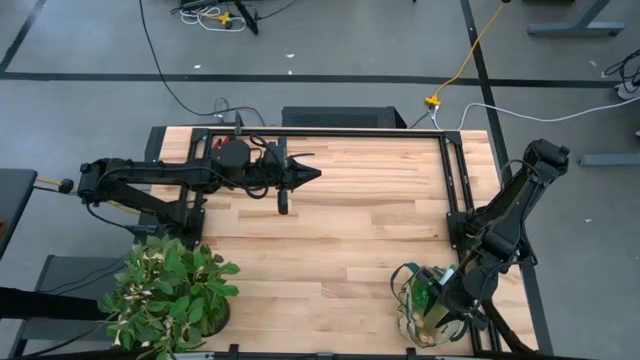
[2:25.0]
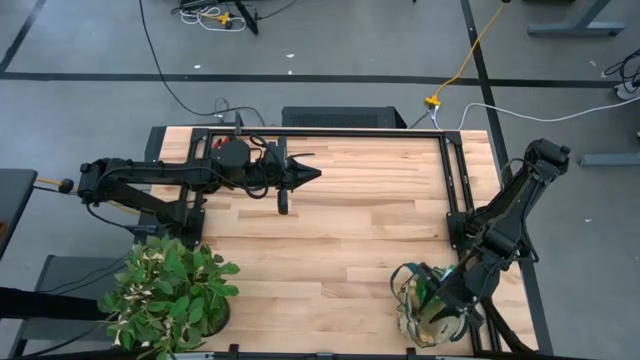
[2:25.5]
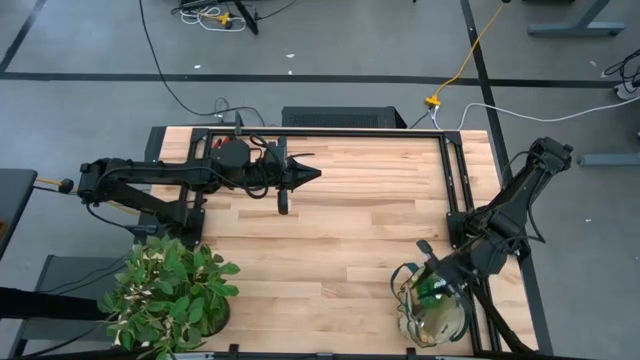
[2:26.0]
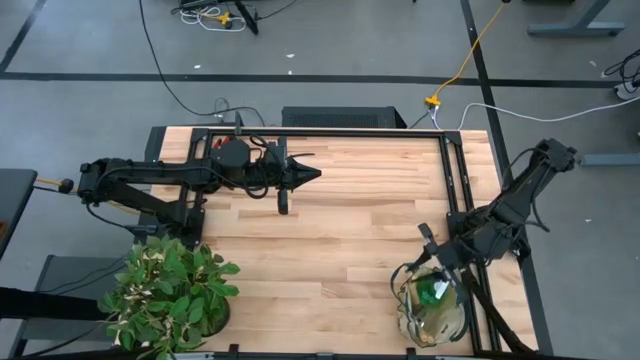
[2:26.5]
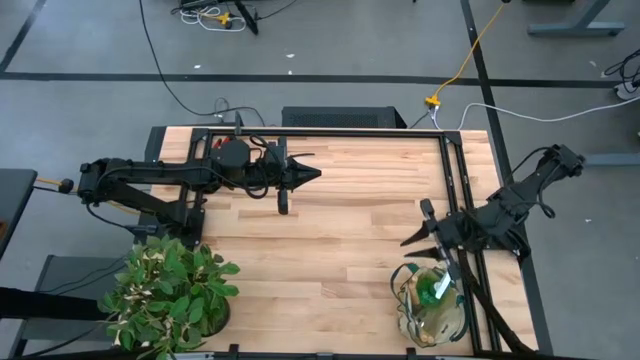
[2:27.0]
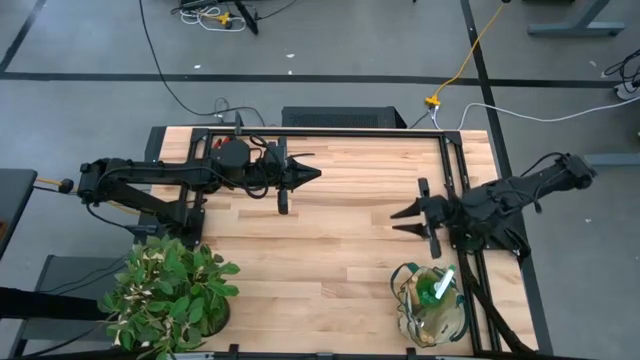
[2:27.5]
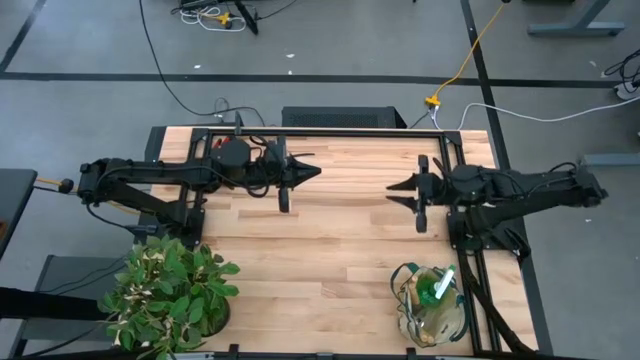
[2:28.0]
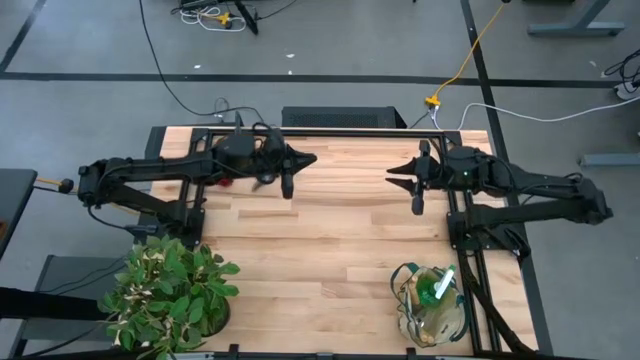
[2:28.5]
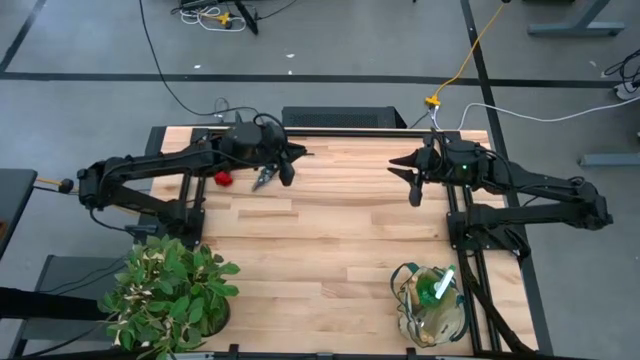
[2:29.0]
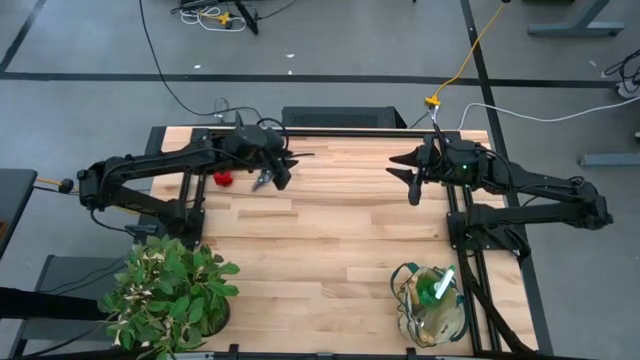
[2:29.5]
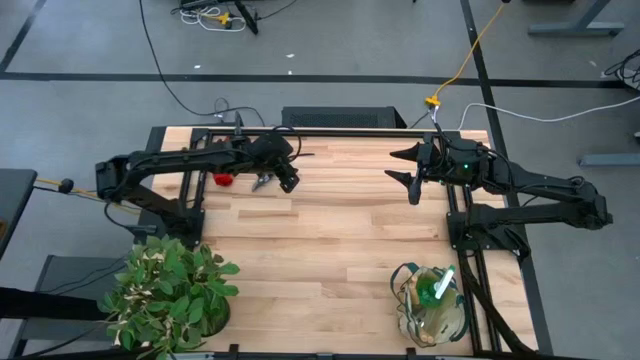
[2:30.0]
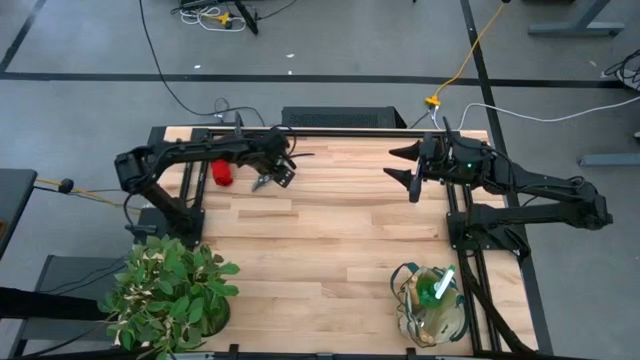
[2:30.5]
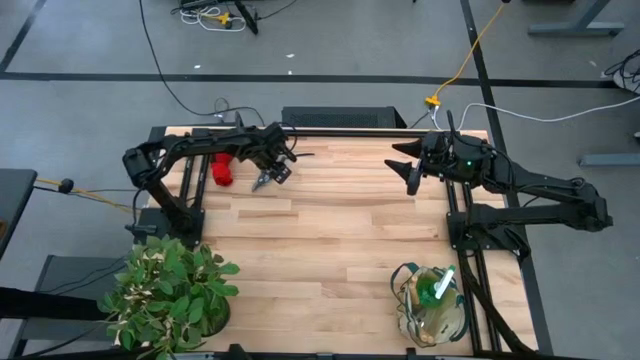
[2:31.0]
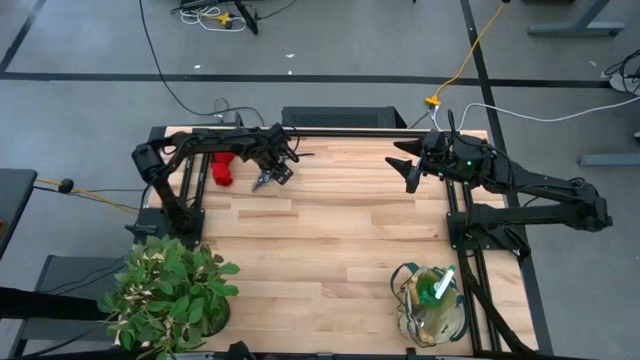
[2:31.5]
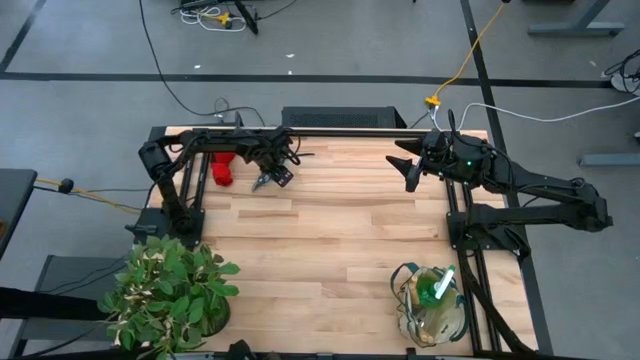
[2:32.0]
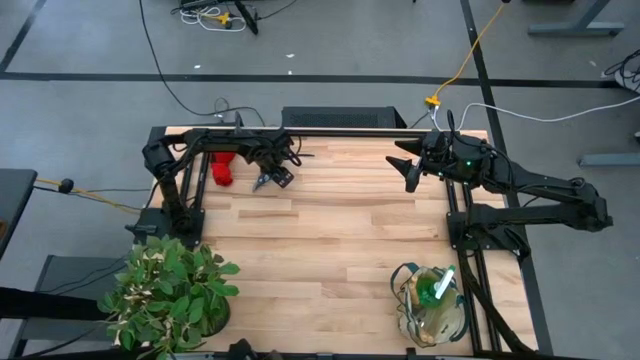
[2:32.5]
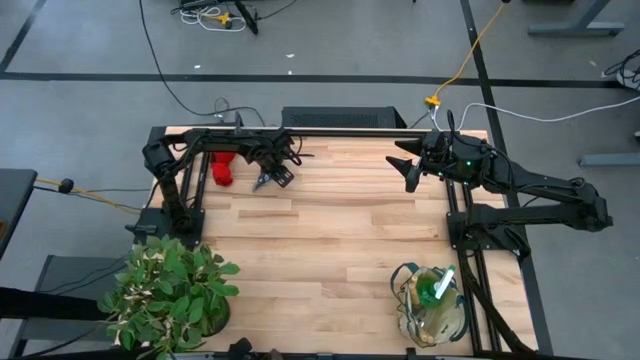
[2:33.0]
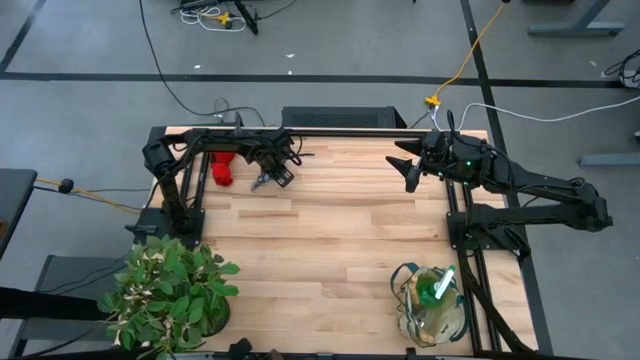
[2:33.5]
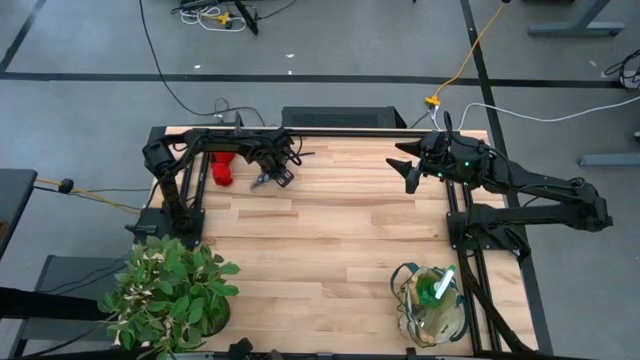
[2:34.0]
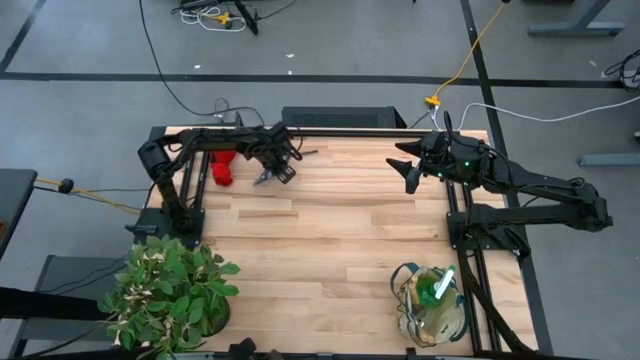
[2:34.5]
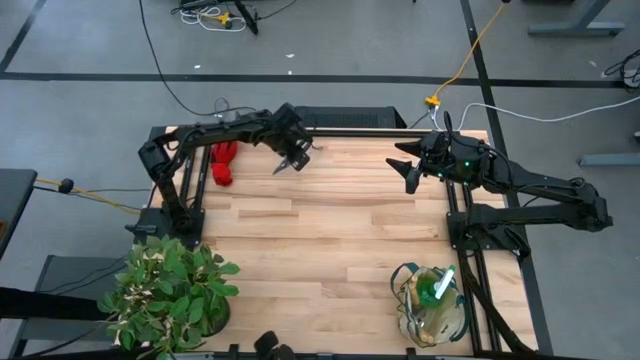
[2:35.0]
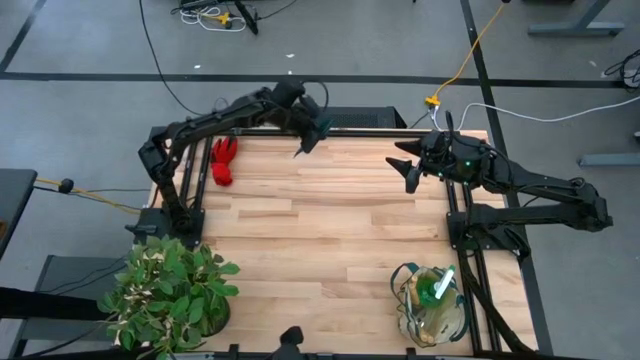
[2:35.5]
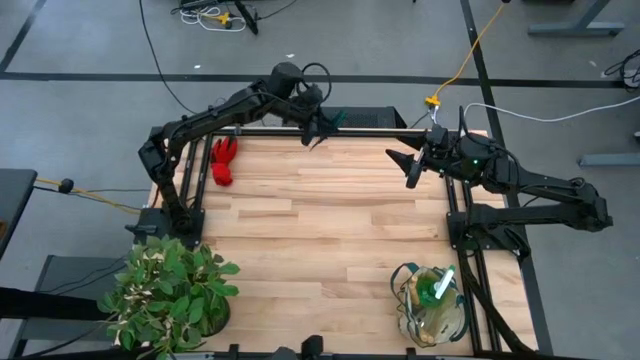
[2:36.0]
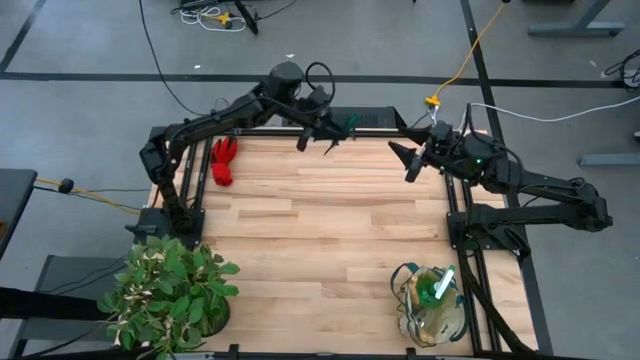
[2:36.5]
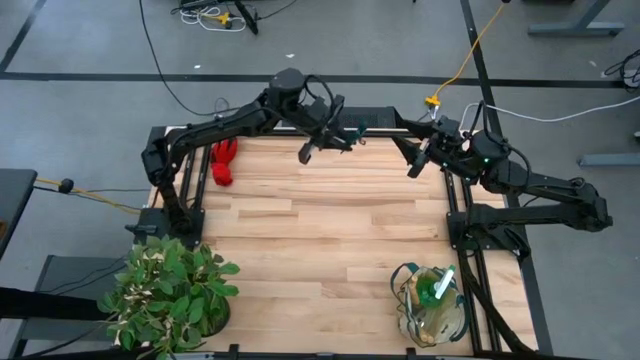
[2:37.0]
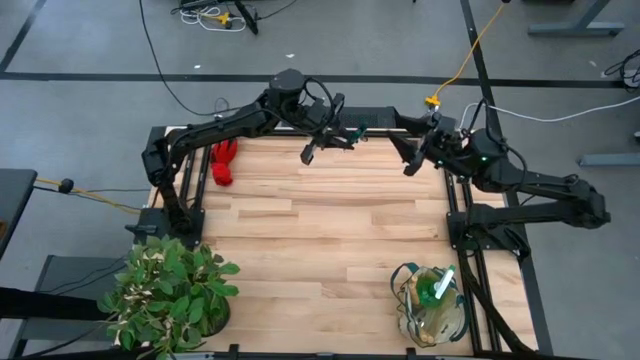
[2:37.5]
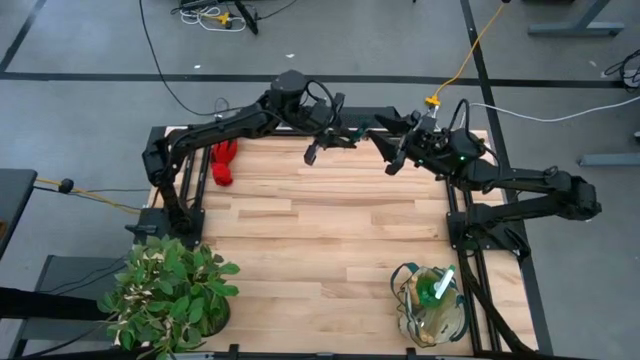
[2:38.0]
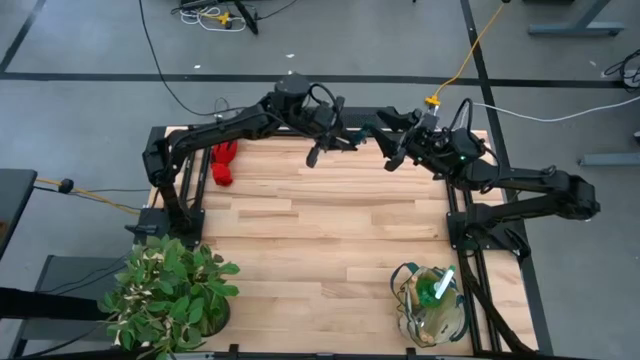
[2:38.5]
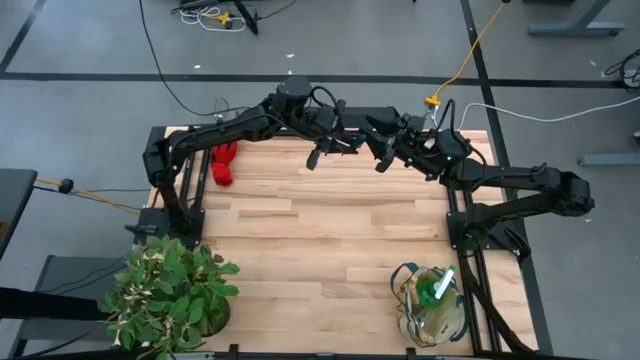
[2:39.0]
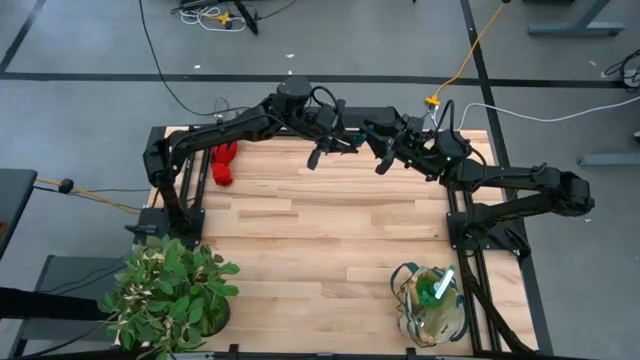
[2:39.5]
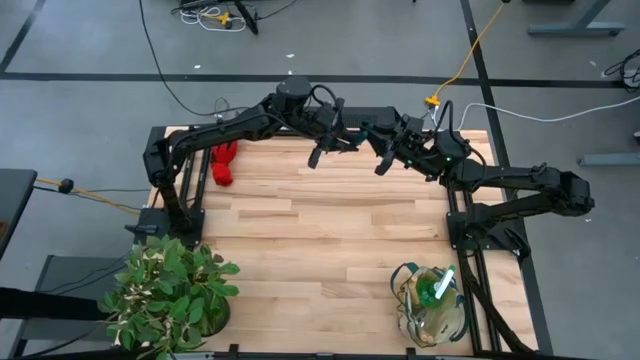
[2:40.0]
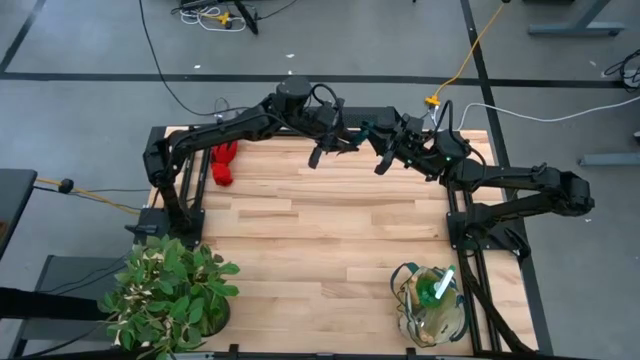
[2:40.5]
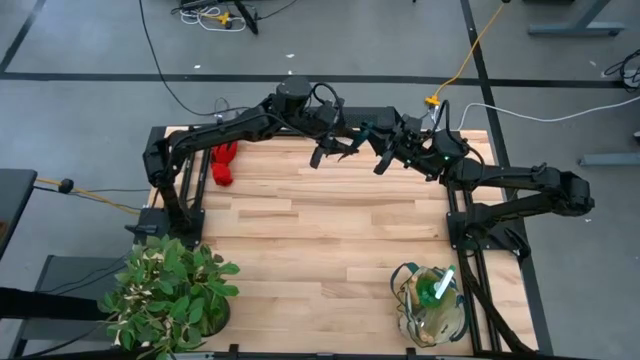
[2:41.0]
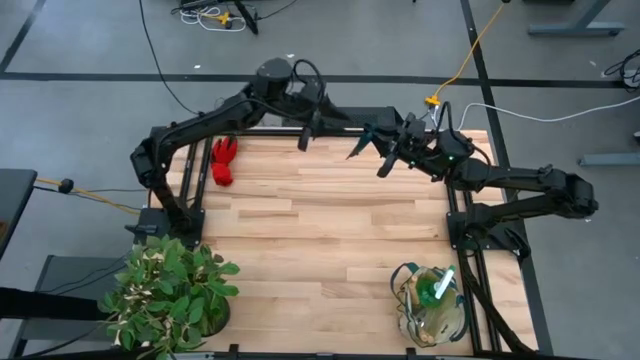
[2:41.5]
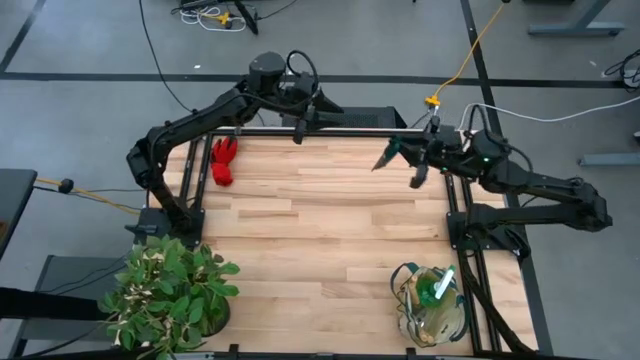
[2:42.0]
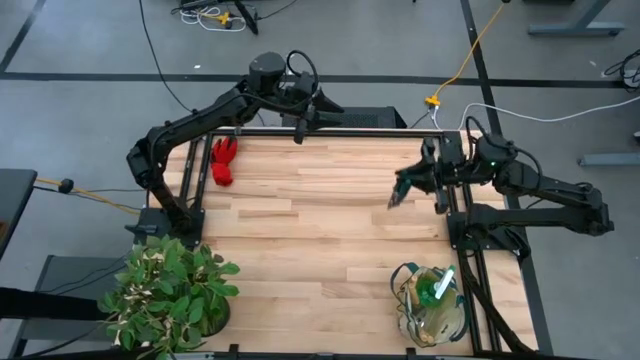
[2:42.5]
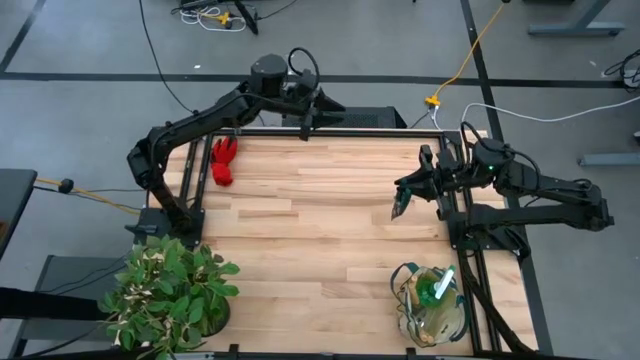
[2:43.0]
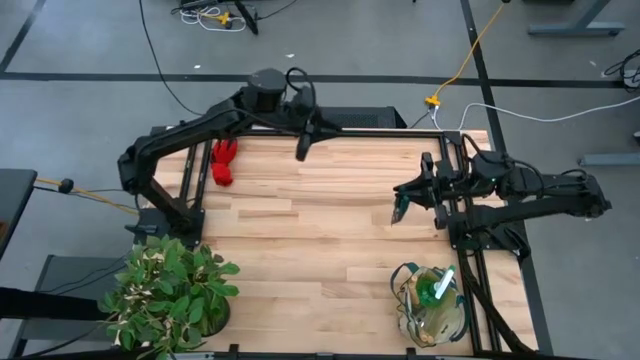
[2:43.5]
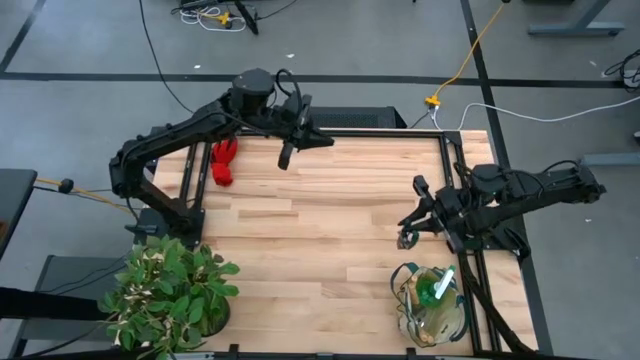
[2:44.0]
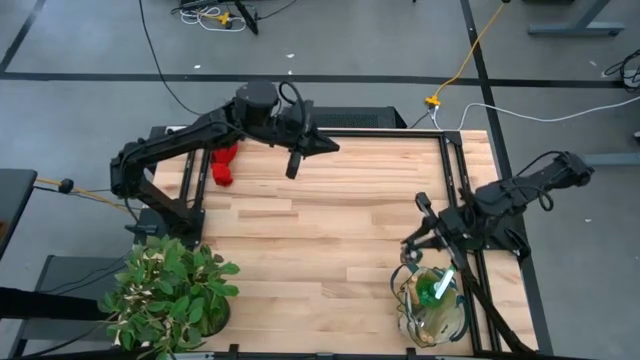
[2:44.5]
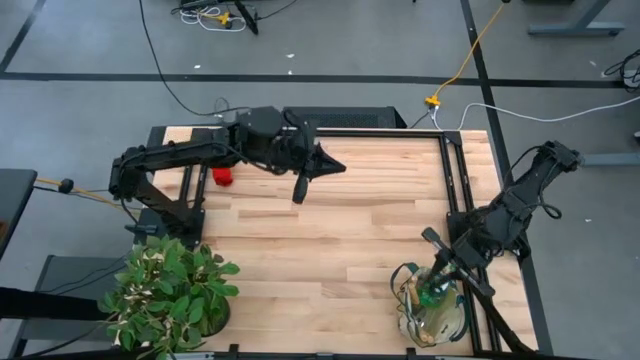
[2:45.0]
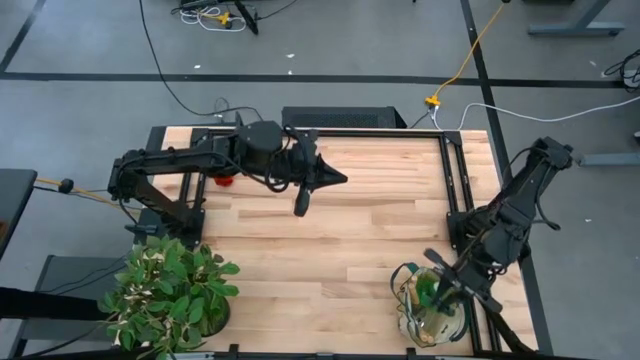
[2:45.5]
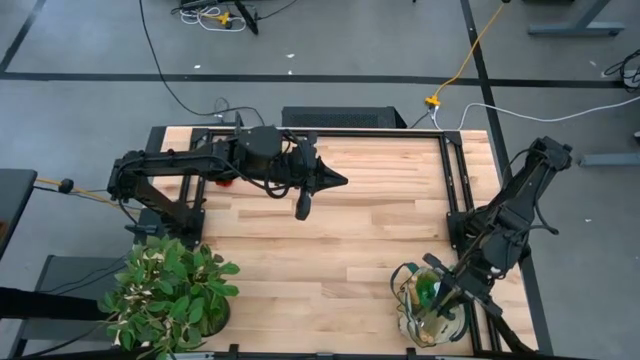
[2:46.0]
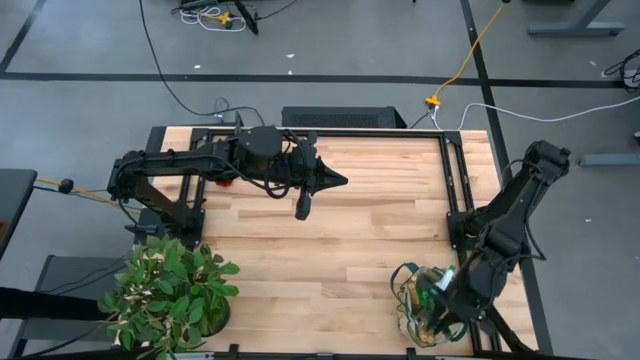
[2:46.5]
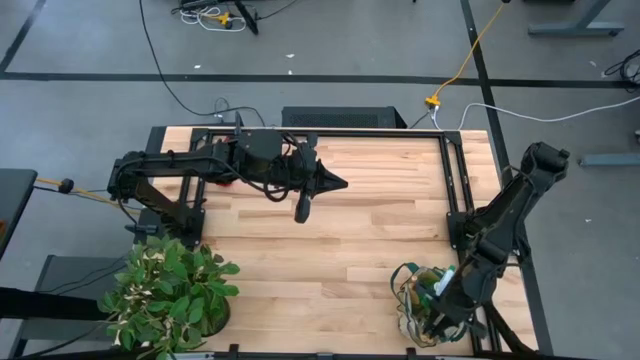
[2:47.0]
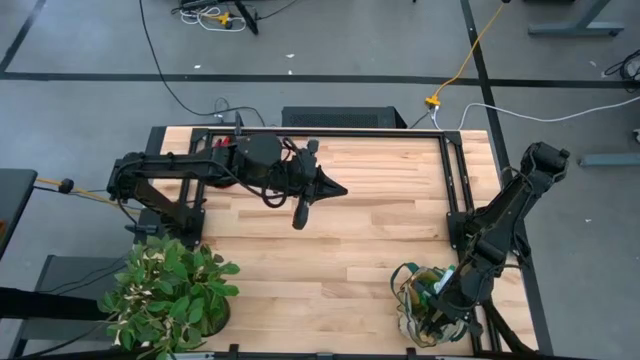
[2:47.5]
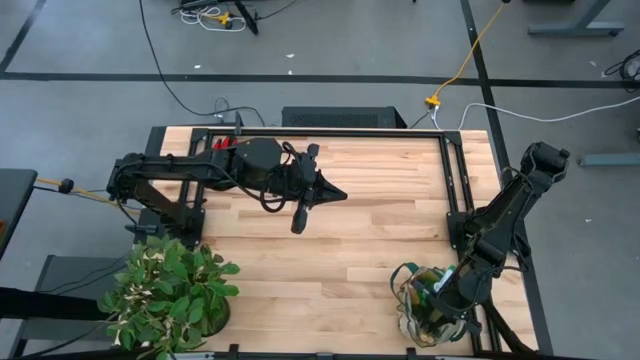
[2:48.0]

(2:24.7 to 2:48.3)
Task: Pick & Place Garden tools in Gardening bag
Put the green shear scissors into the white gardening bag
